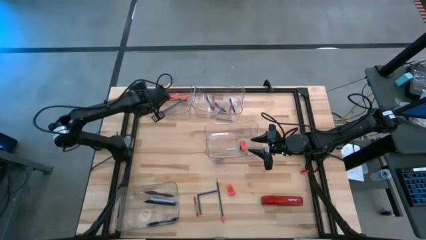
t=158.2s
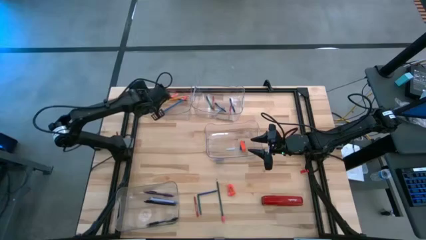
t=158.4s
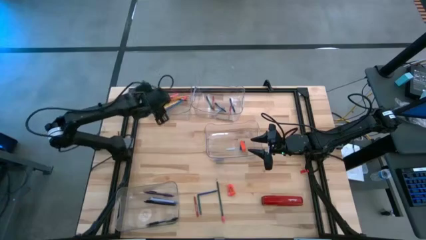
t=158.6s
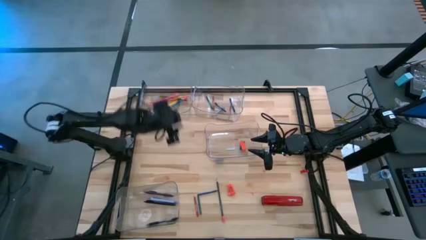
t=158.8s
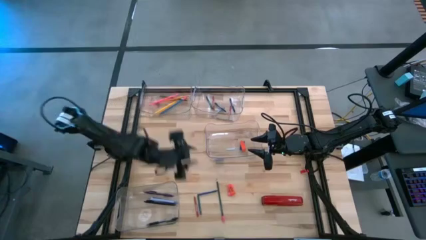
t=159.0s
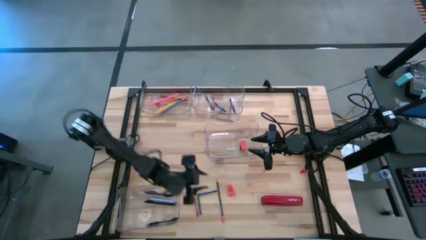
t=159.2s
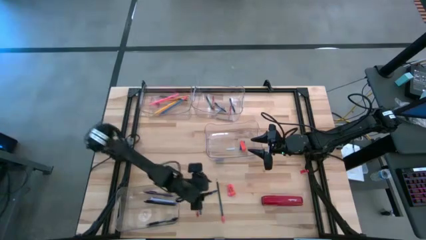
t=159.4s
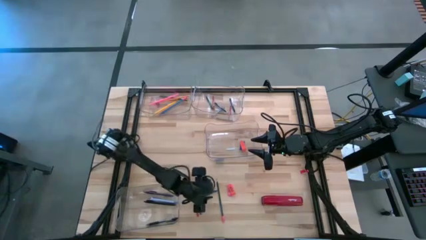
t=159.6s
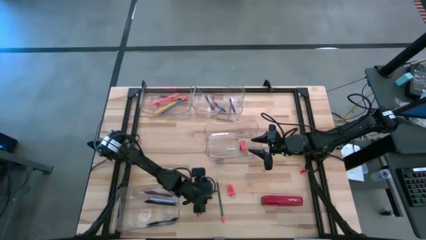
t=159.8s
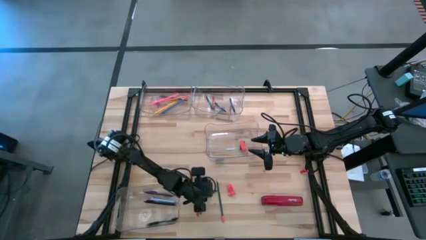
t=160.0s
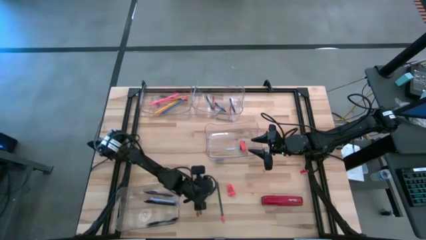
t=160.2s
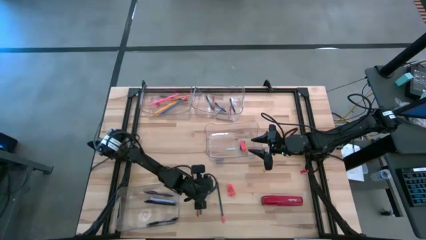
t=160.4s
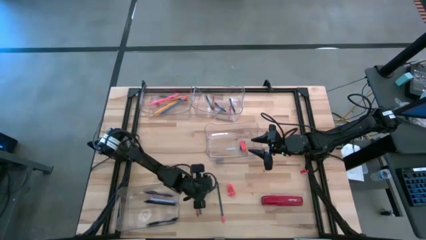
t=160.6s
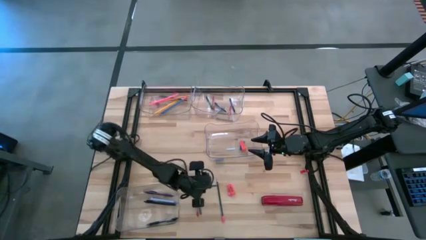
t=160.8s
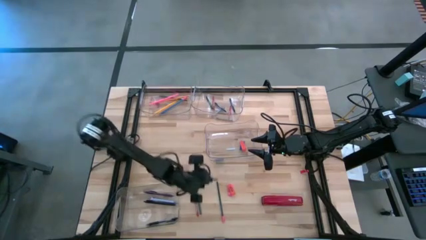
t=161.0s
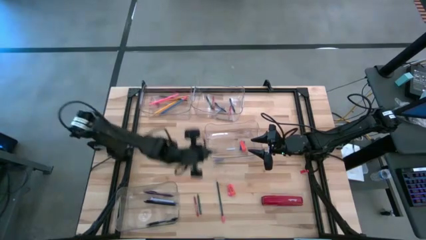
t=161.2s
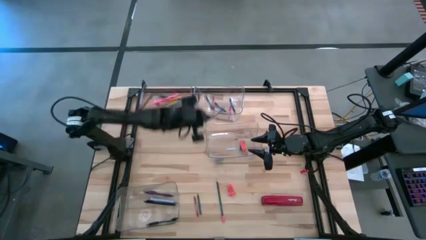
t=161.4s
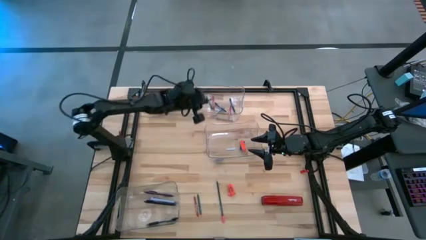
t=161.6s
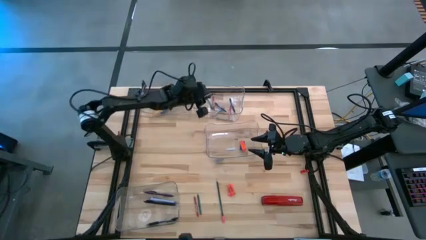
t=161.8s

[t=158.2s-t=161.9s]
Task: Sort crayons/erasers/pens/pencils in bins
Put the blue crayon into the top right transparent bin

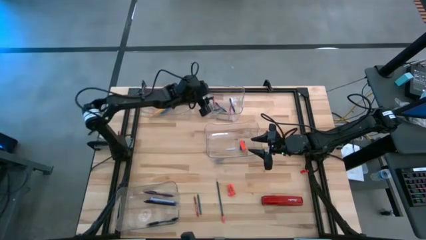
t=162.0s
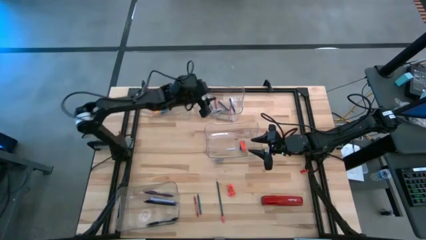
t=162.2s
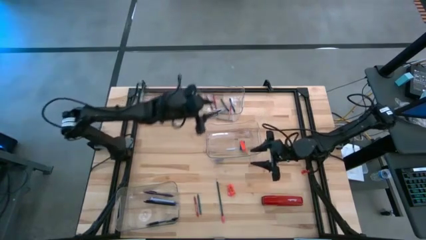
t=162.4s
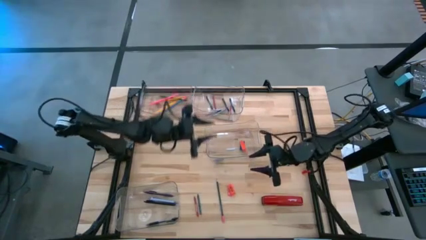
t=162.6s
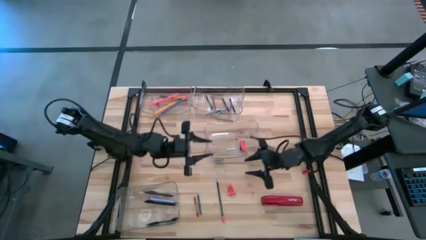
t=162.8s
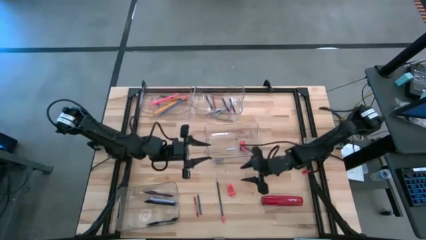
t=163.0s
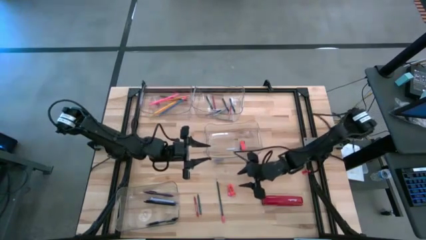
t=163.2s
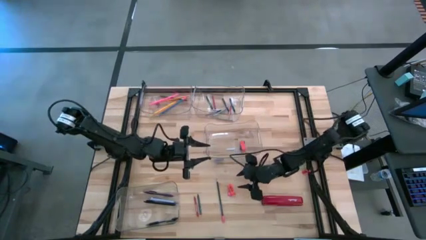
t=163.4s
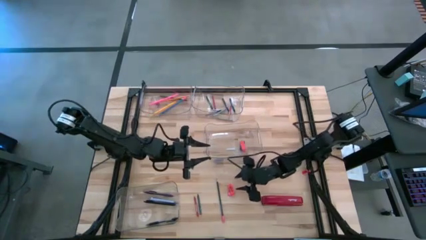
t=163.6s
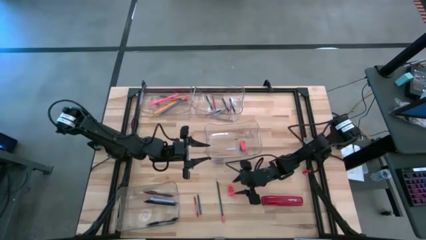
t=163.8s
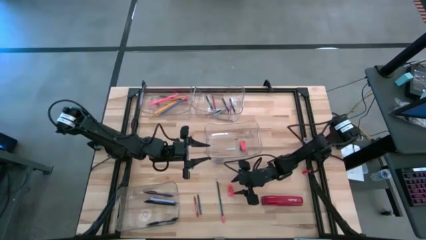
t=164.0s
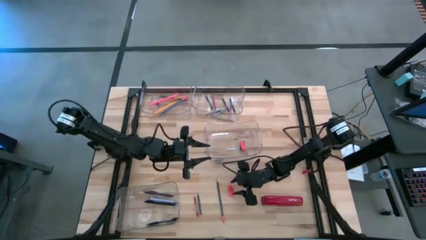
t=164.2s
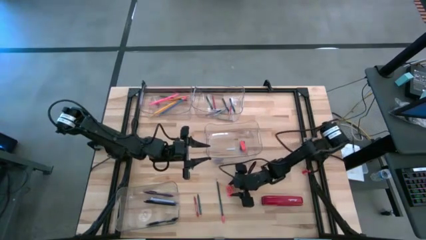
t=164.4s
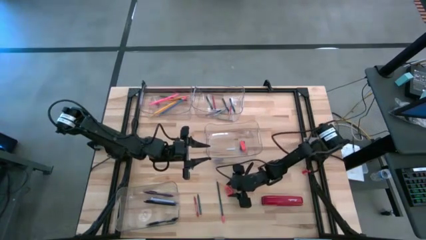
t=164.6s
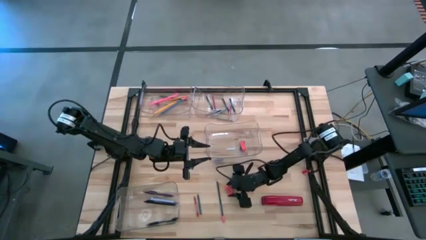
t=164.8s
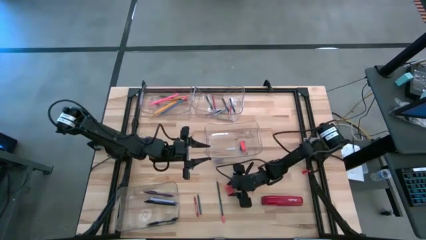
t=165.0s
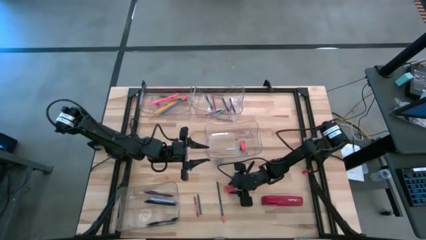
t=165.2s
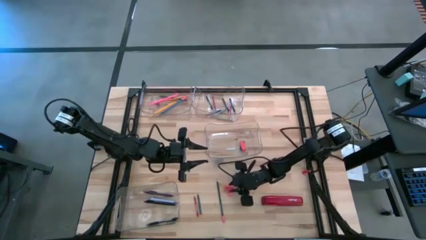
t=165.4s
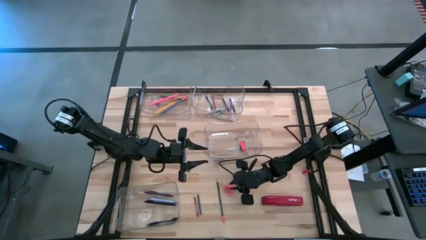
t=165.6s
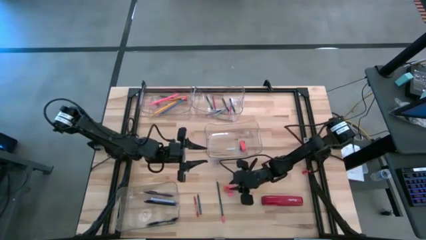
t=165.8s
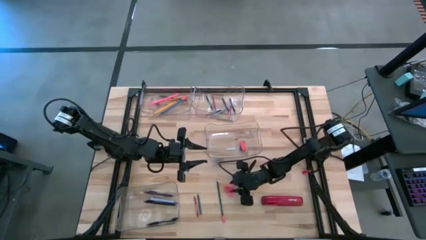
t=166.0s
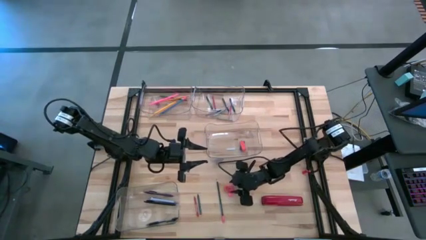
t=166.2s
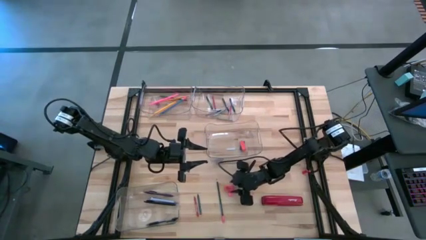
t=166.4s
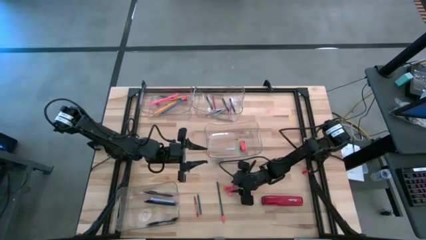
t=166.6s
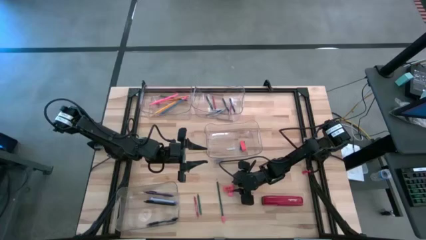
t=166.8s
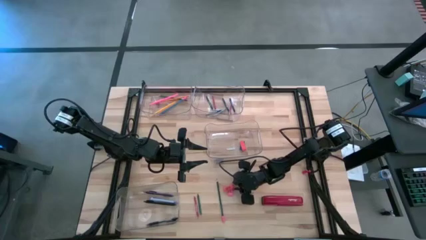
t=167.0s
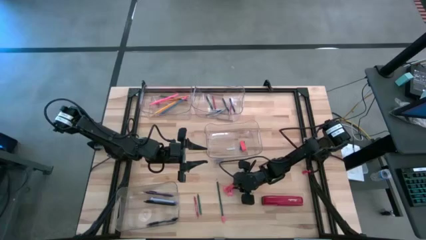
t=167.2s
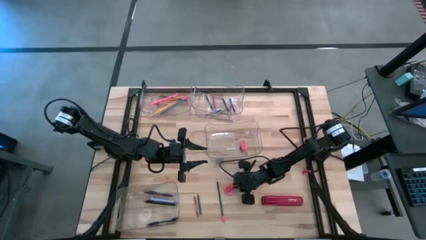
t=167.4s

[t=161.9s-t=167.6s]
Put the orange eraser into the middle transparent bin

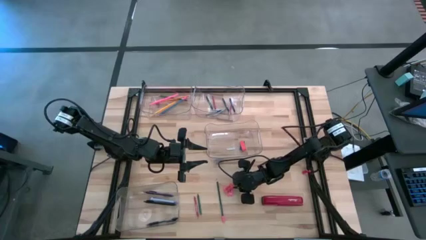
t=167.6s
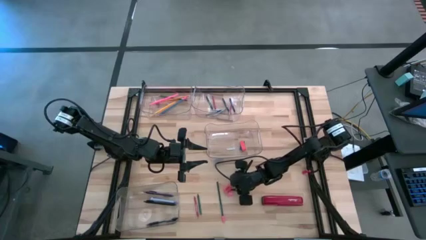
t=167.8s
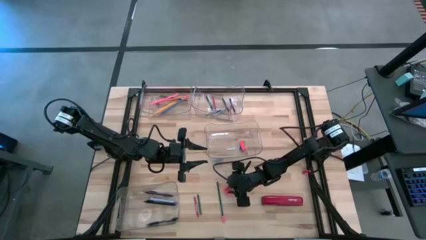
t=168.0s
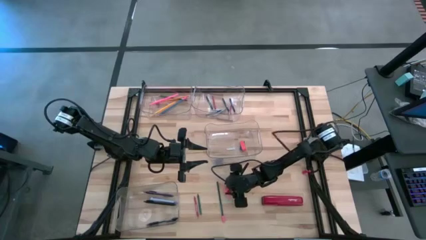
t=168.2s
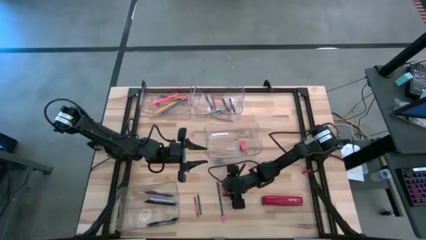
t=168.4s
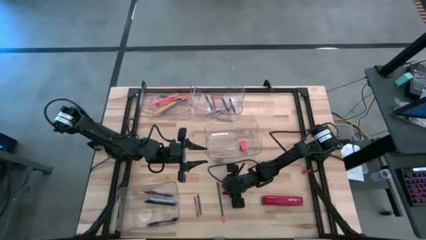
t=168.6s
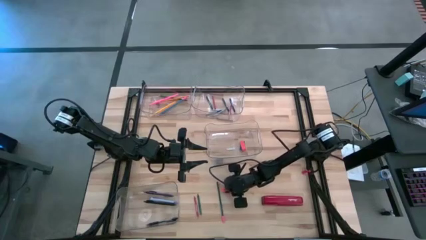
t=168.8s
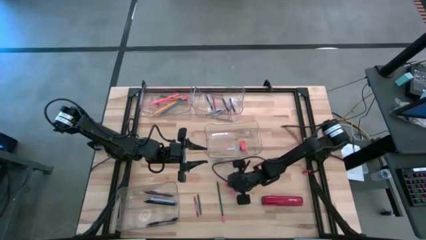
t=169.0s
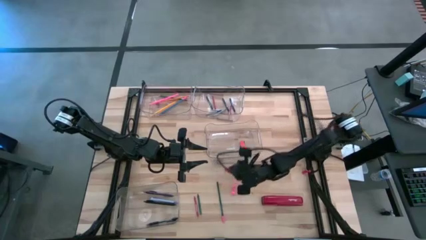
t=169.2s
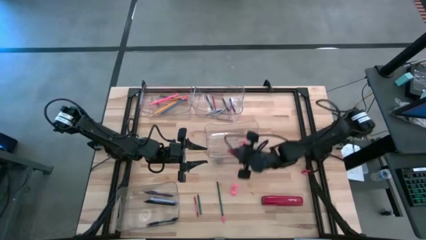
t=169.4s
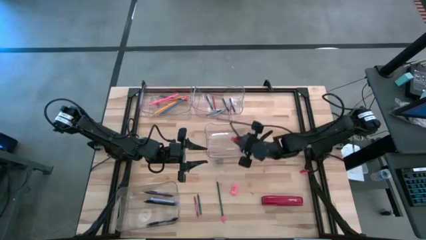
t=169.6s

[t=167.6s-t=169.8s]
Put the orange eraser into the middle transparent bin

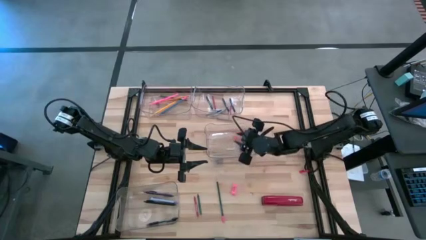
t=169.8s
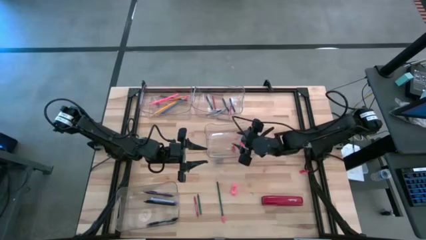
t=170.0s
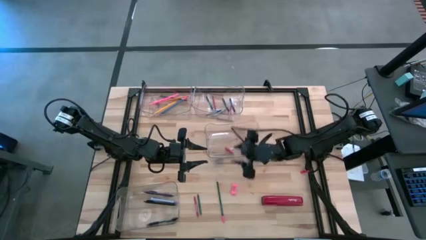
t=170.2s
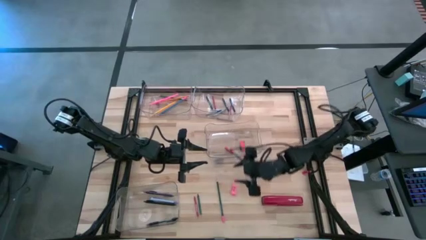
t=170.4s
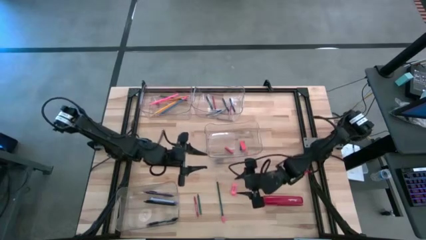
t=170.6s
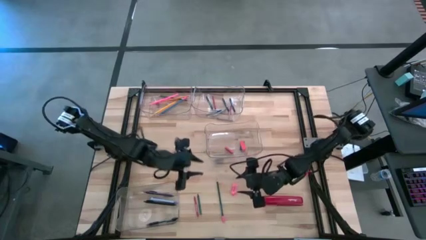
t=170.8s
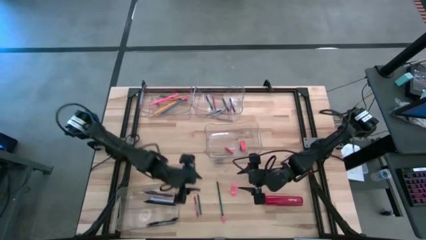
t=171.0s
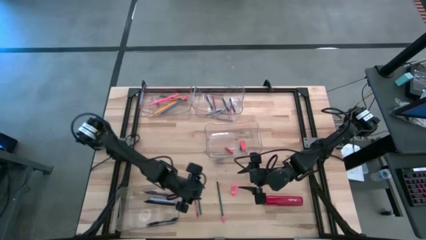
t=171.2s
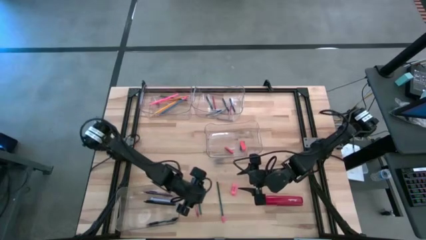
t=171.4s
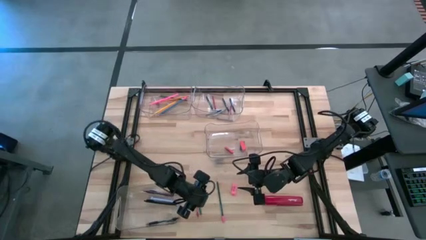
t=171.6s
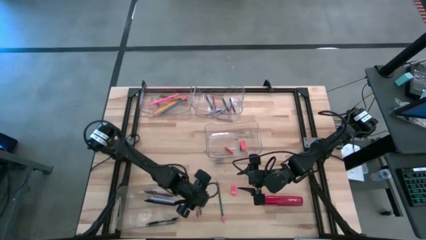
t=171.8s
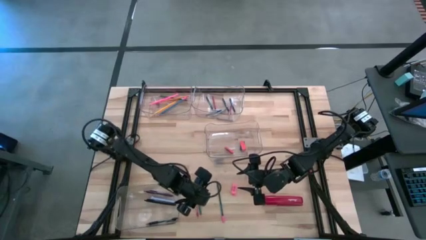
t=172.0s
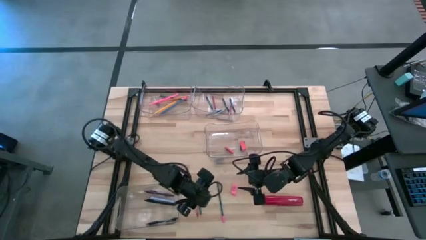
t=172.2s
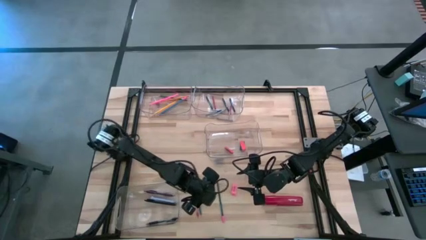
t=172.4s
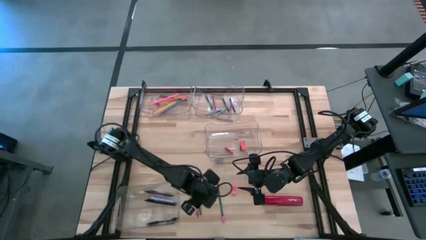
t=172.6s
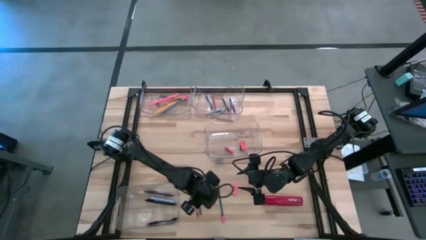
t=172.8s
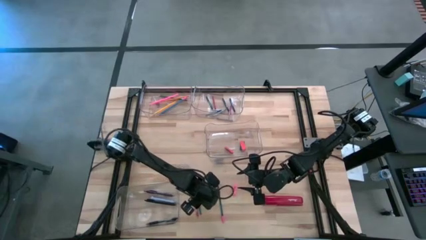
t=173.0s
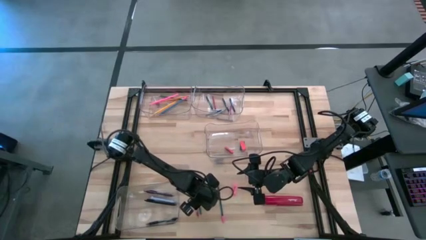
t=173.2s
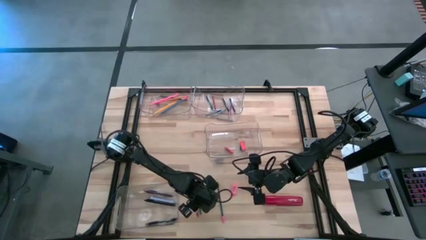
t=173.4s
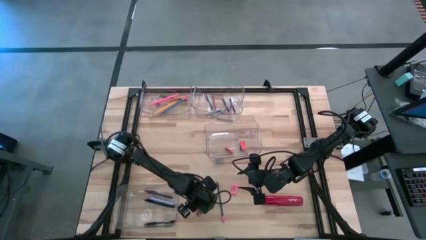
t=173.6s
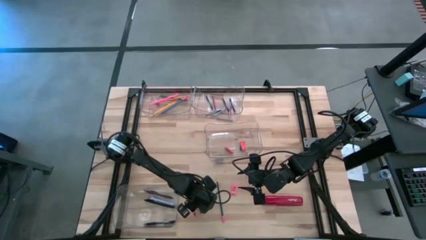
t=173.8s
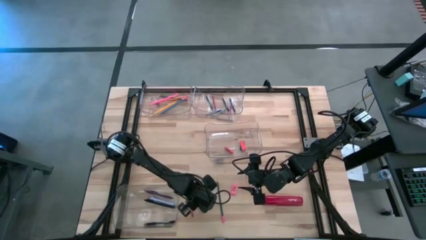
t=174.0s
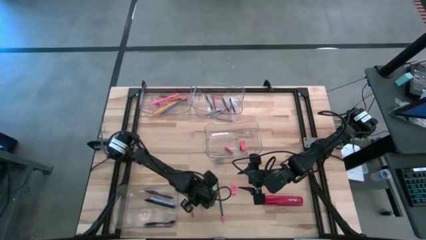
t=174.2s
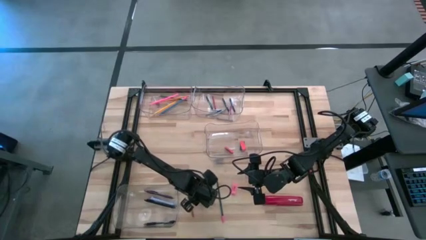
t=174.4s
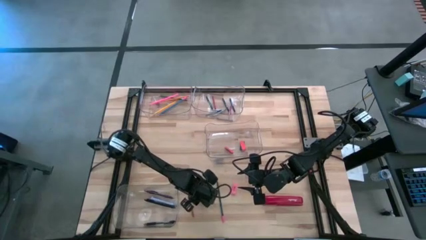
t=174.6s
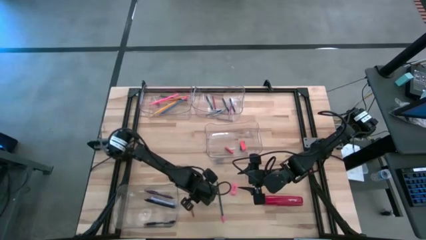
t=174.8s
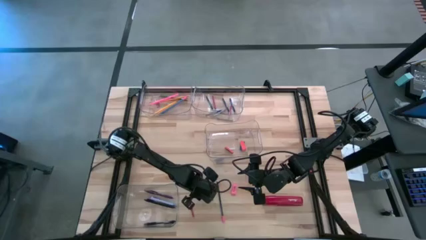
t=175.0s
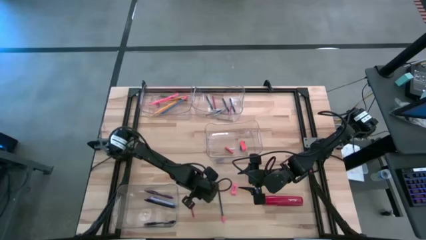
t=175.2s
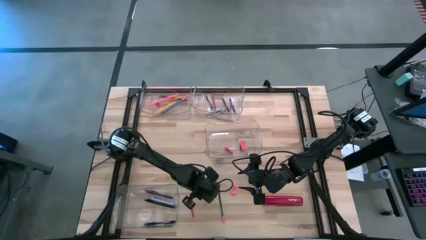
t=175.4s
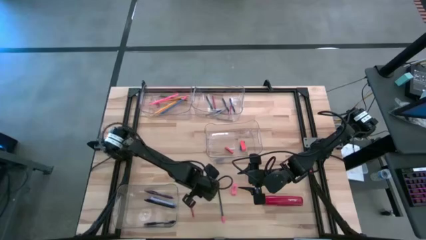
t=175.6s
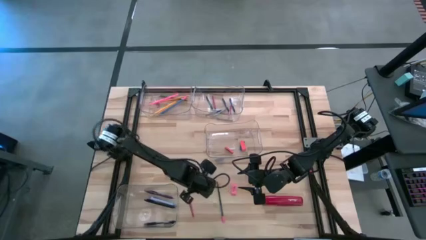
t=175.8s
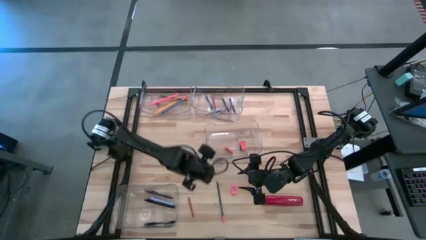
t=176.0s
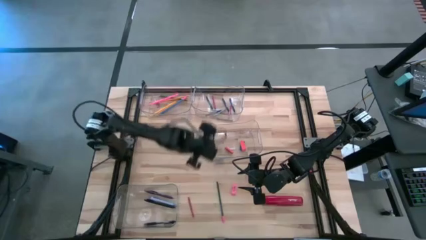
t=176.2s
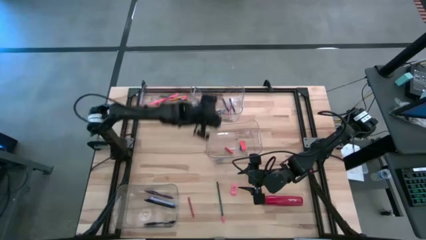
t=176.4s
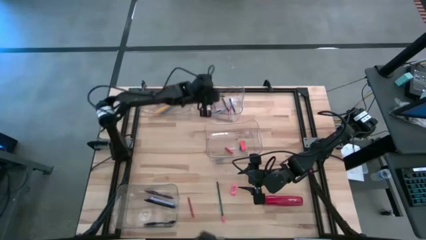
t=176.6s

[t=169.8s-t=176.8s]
Put the green crayon into the top right transparent bin
